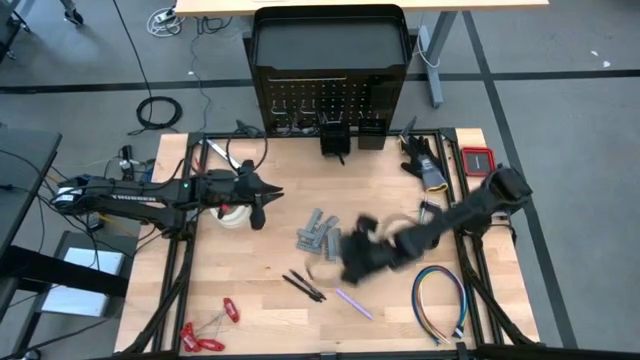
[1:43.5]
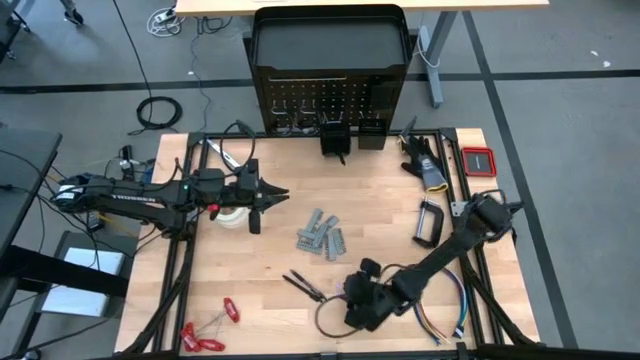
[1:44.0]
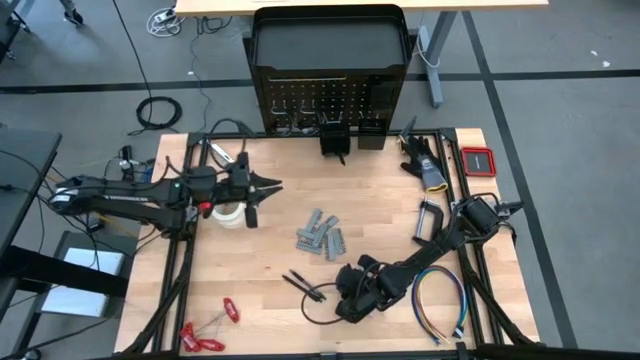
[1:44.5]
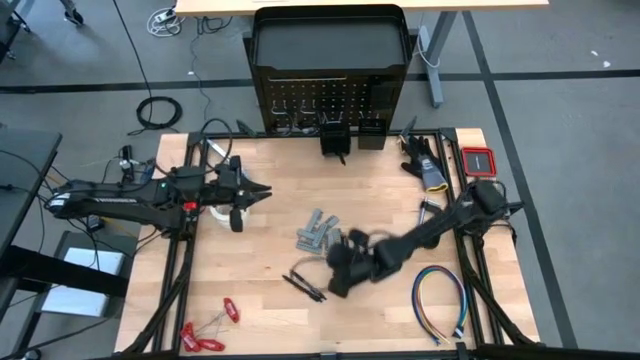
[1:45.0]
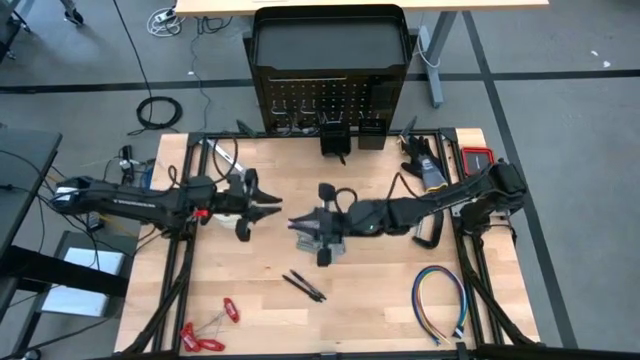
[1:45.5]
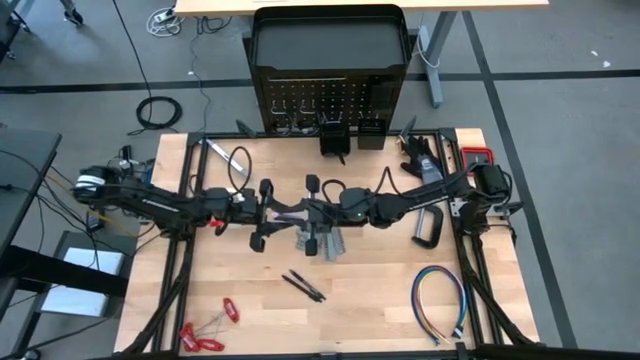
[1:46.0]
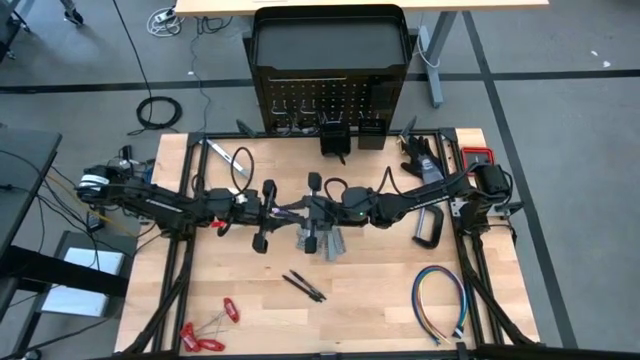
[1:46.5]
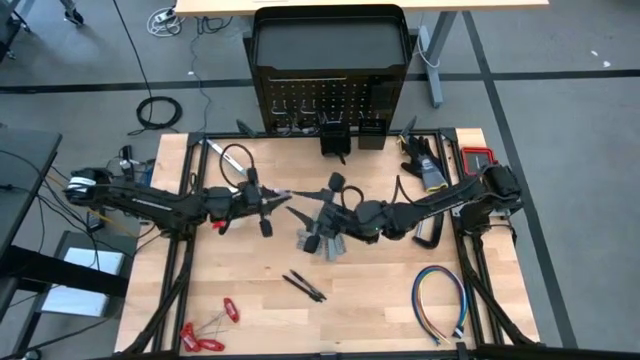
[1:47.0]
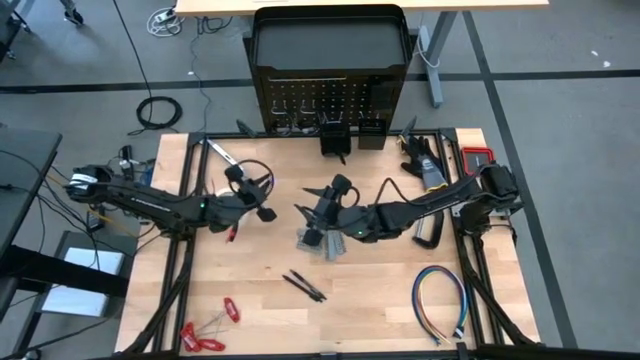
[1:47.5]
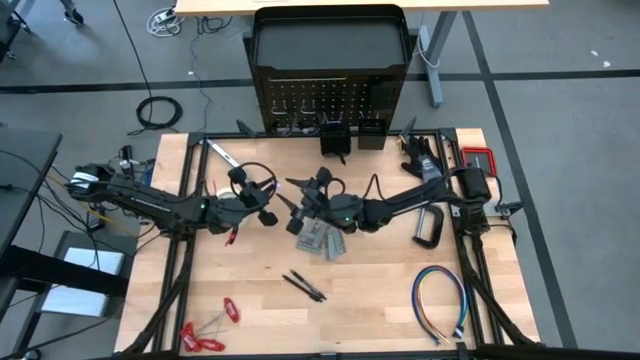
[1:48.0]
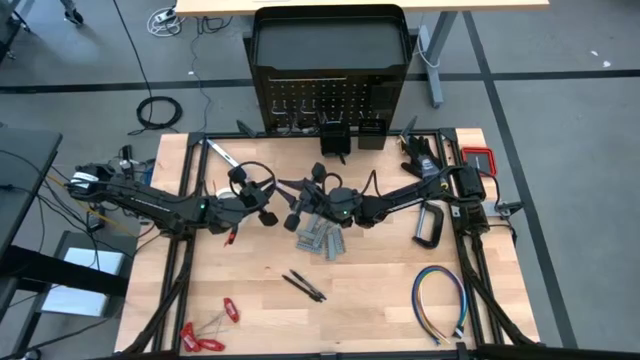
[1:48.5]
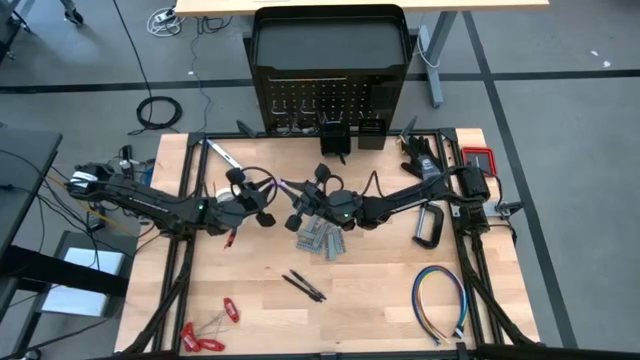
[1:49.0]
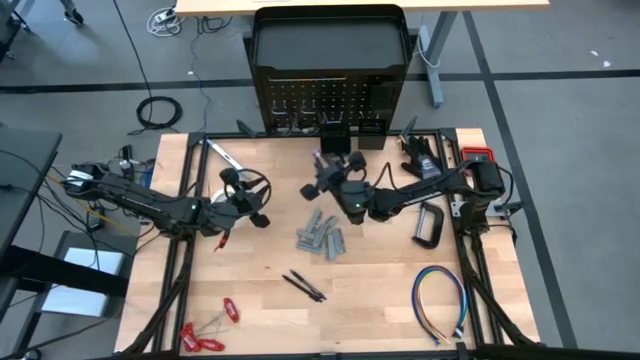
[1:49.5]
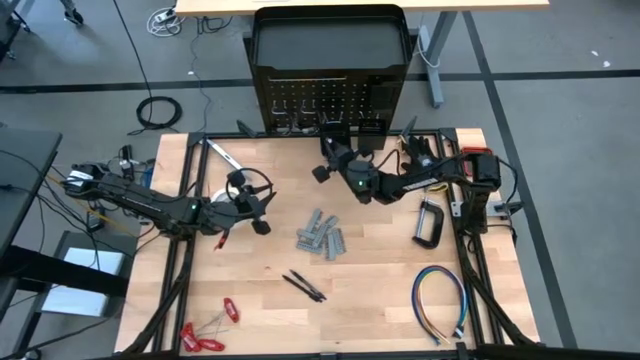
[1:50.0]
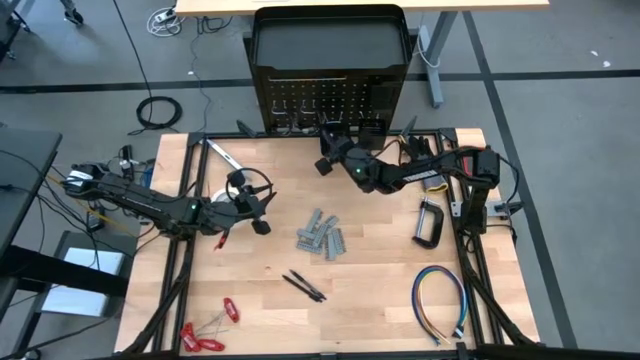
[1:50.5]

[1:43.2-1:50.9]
Task: Hang tools onto peg board
Put the purple pen into the left black bin on the peg board

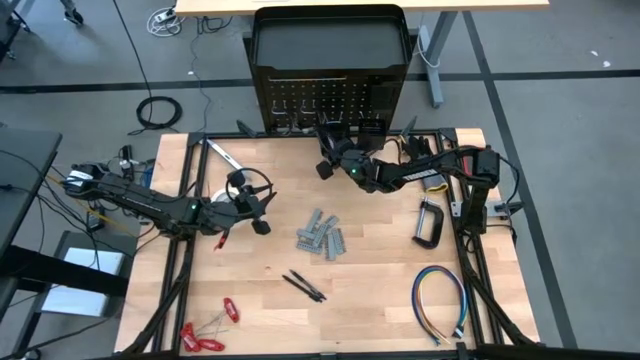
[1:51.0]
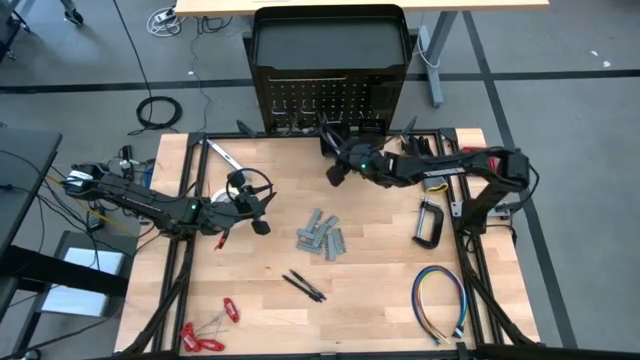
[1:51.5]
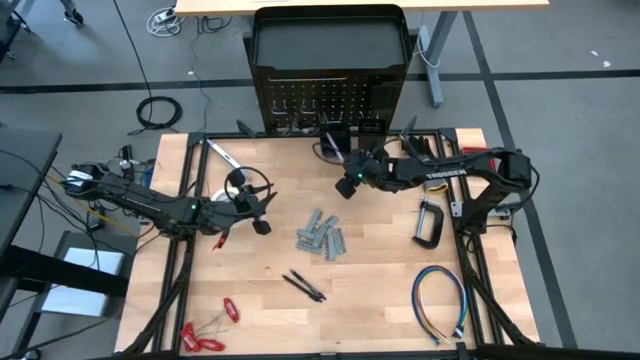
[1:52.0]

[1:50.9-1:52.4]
Adjust the black pen in the left black bin on the peg board

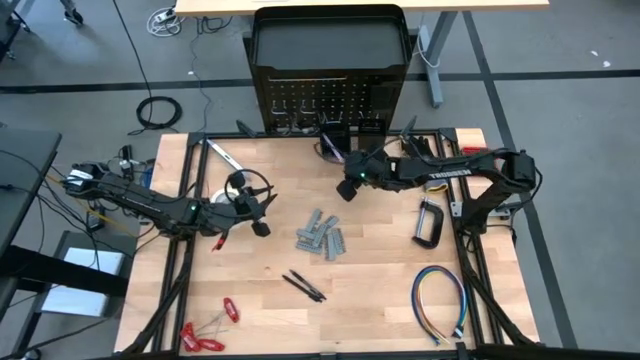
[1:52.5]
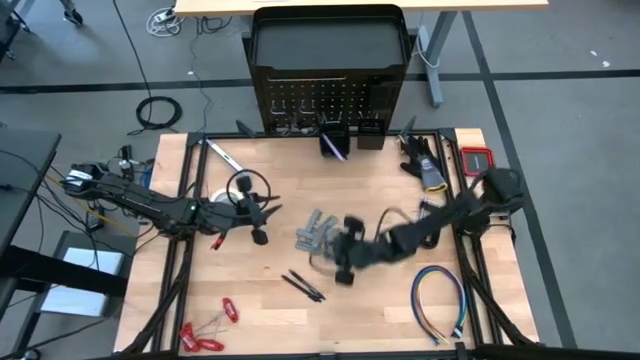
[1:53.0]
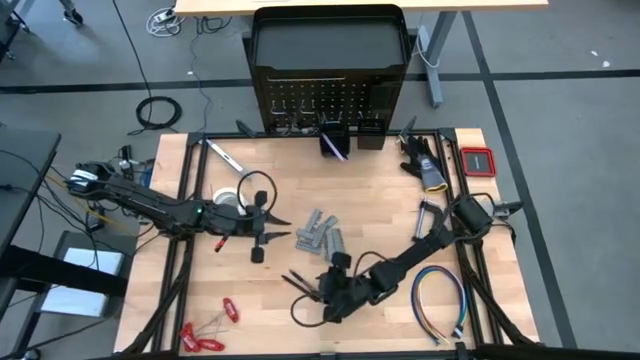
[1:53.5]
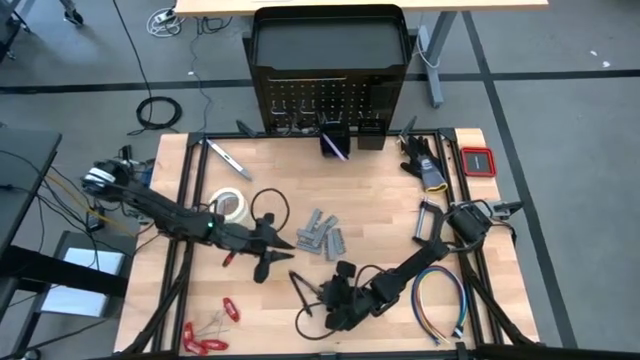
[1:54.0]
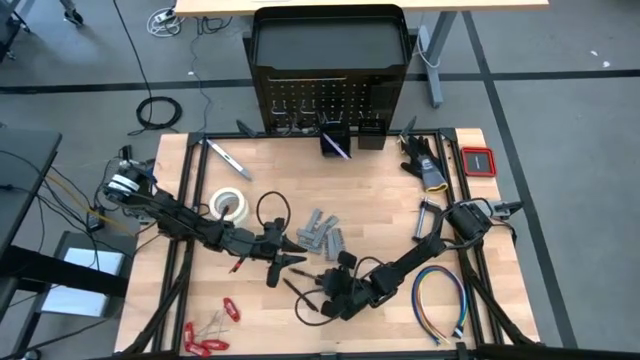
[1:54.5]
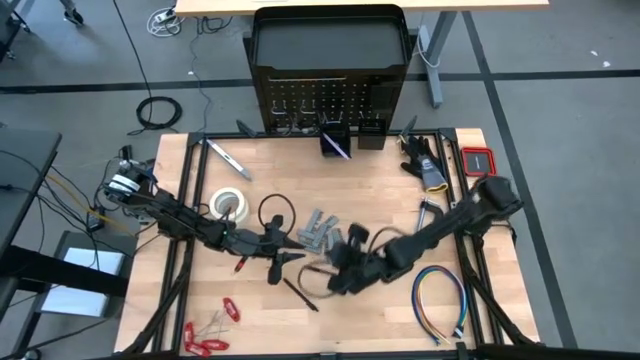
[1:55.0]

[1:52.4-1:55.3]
Put the black pen into the left black bin on the peg board

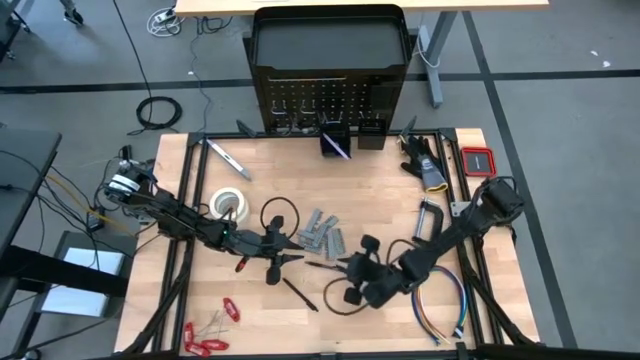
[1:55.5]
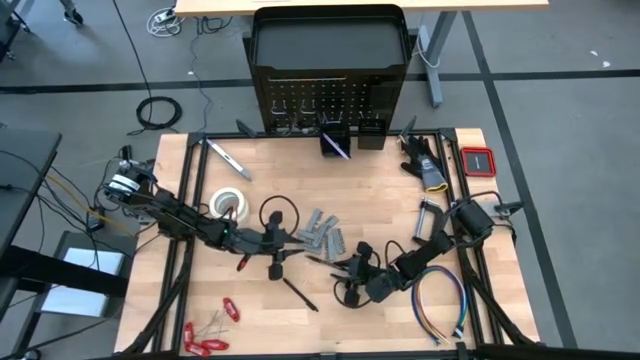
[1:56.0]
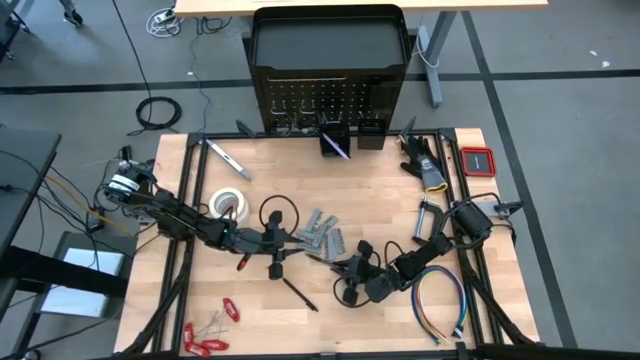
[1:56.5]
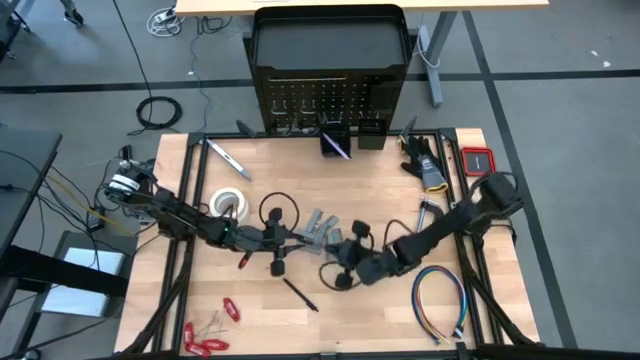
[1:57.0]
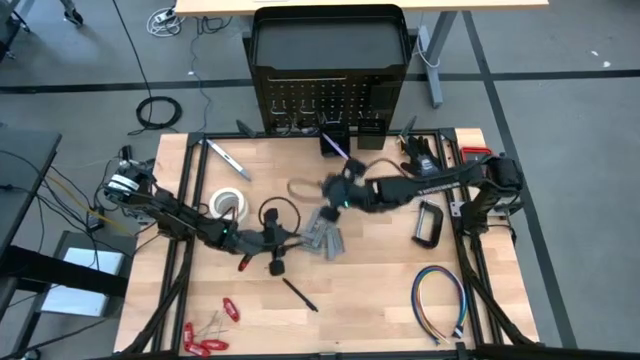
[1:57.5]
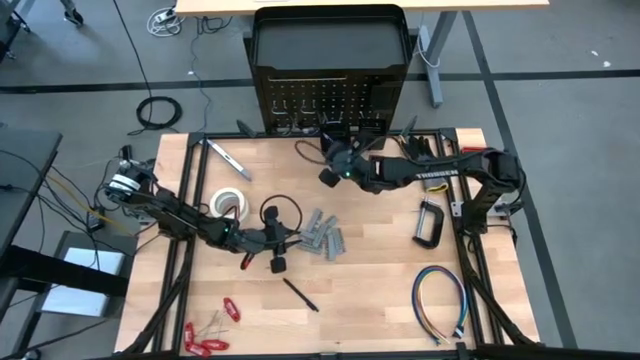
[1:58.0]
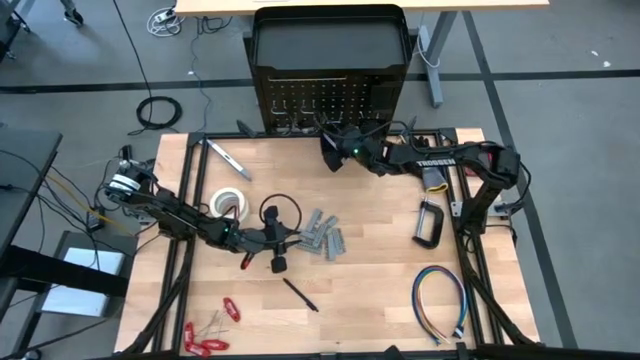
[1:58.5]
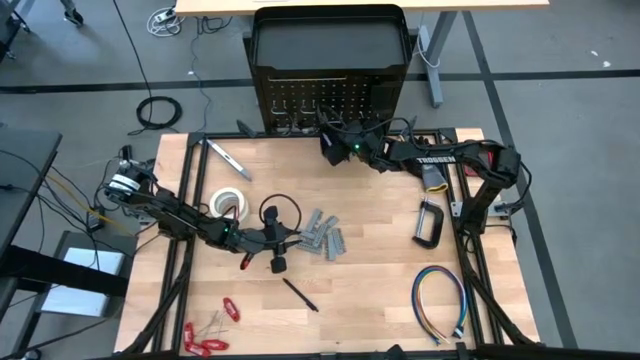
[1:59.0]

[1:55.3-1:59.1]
Put the black pen into the left black bin on the peg board

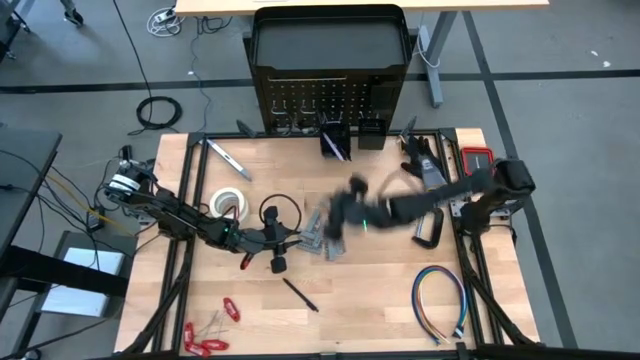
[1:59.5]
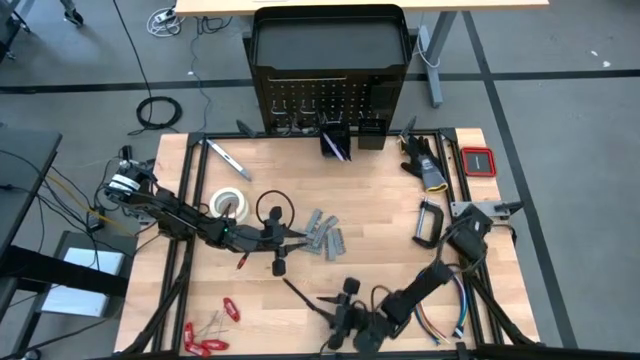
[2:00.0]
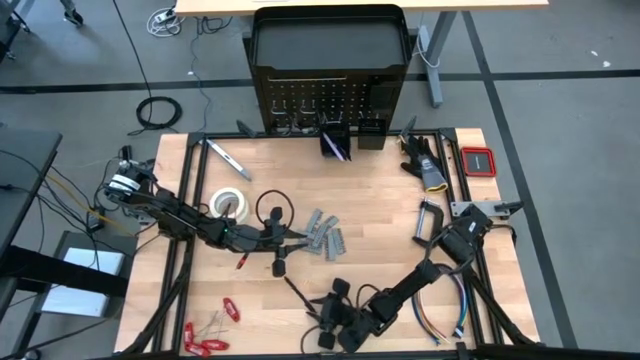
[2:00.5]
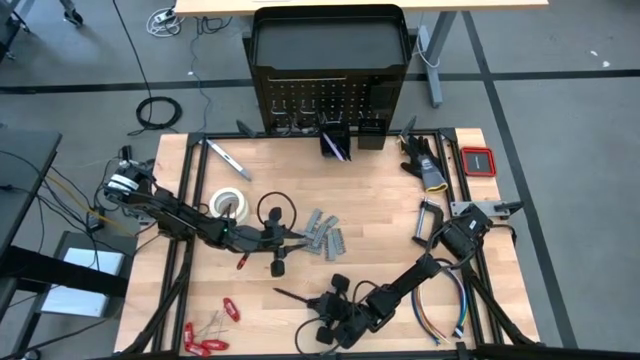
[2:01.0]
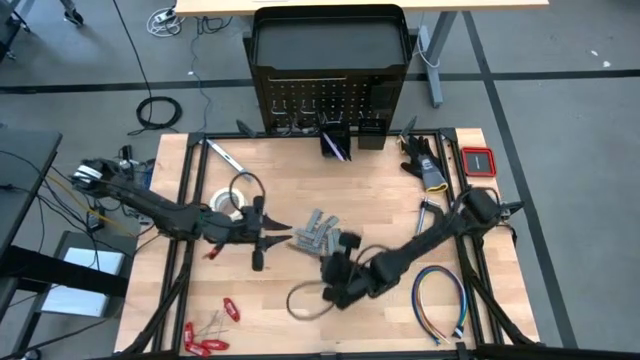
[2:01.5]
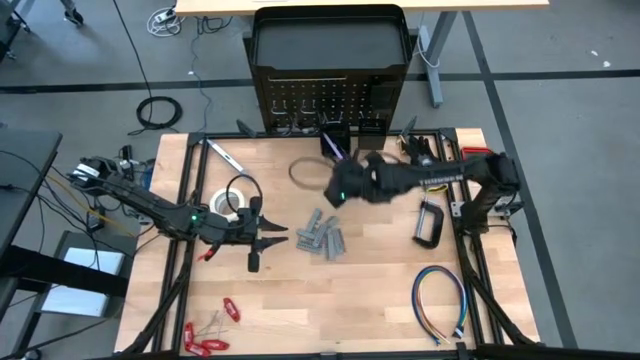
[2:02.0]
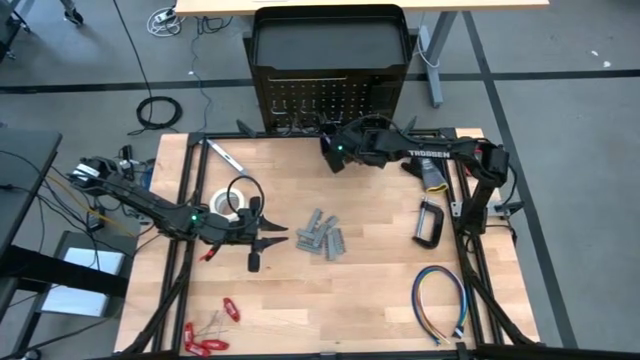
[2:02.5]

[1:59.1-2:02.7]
Put the black pen into the left black bin on the peg board

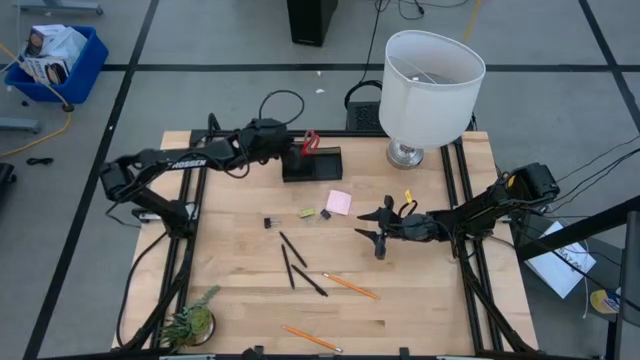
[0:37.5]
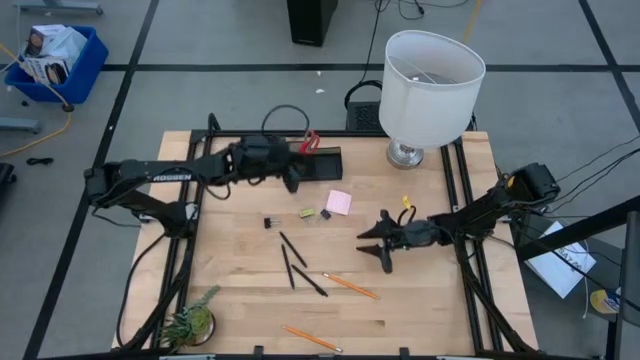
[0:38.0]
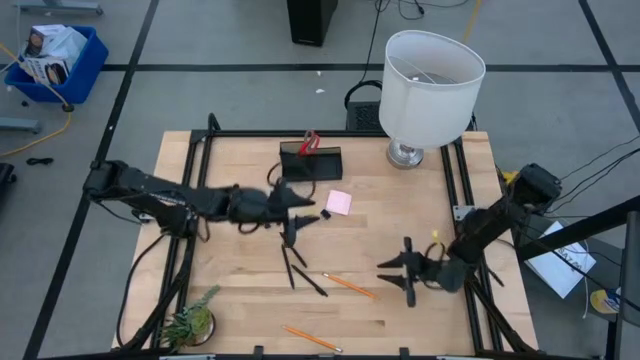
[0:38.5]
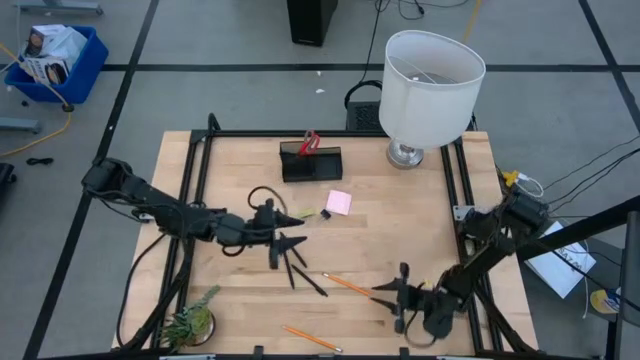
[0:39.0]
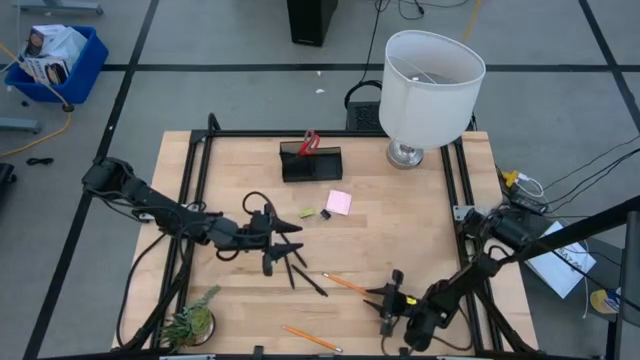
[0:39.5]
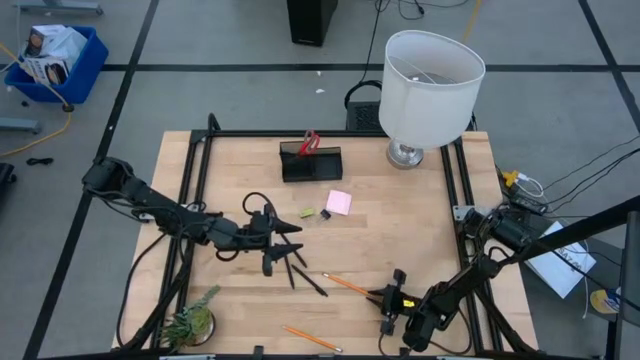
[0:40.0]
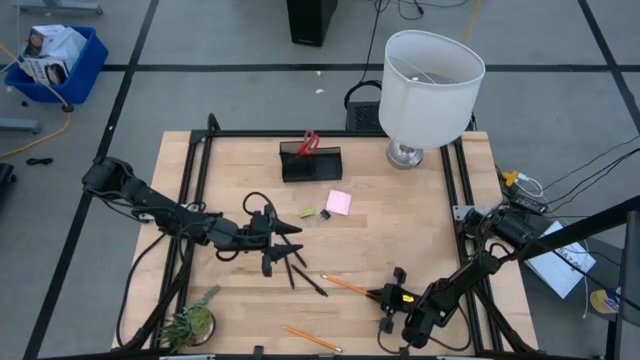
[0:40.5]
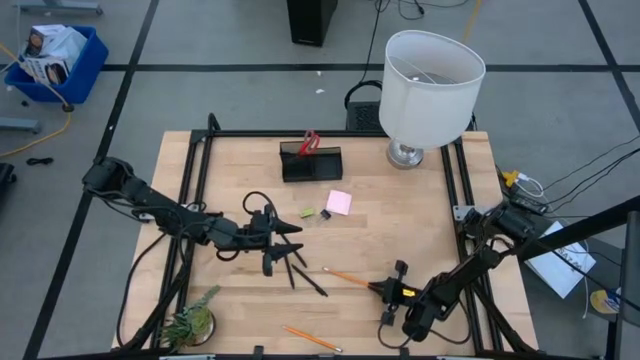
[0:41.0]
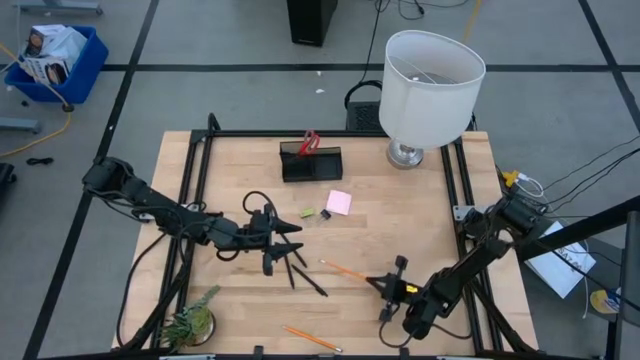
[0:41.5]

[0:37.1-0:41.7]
Task: Pick and place office supplies into organizer
Put the yellow pencil into the black desk organizer
